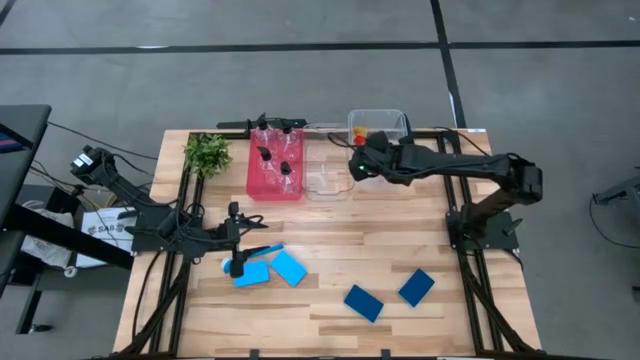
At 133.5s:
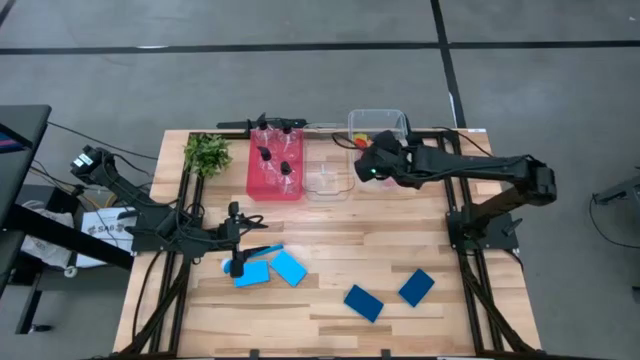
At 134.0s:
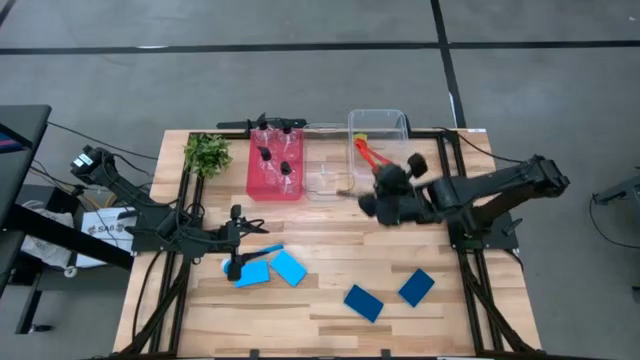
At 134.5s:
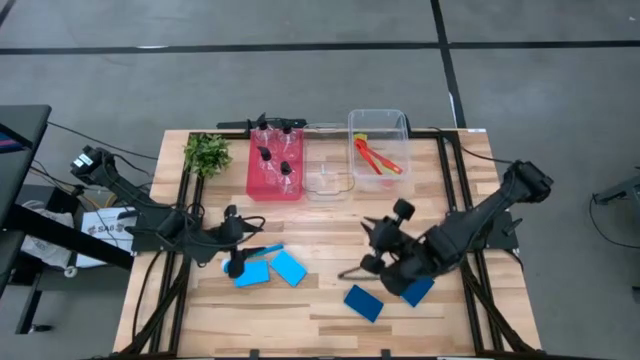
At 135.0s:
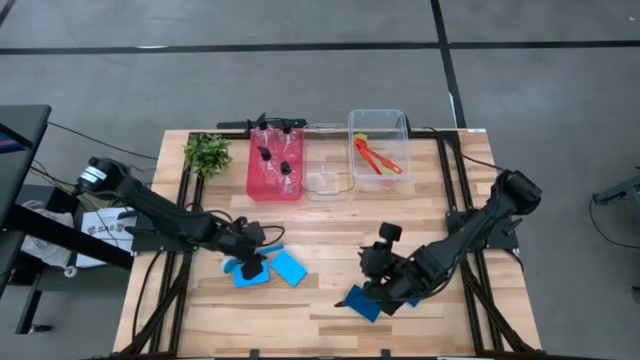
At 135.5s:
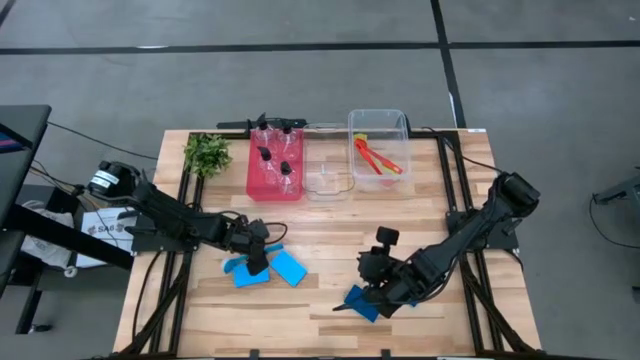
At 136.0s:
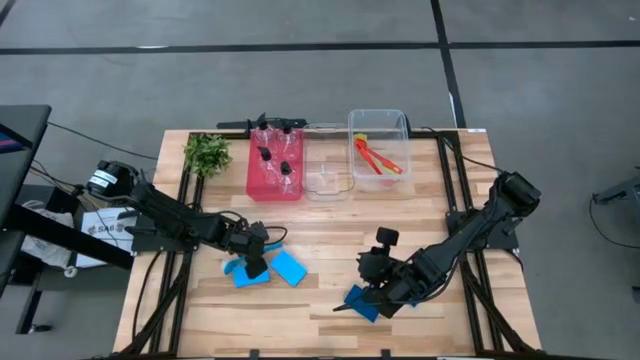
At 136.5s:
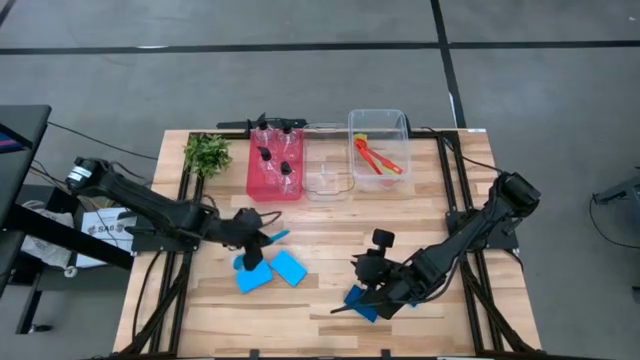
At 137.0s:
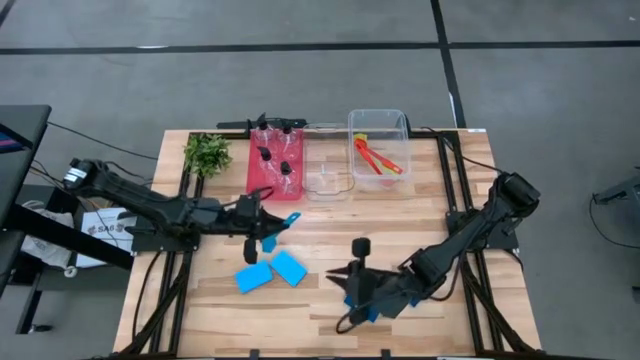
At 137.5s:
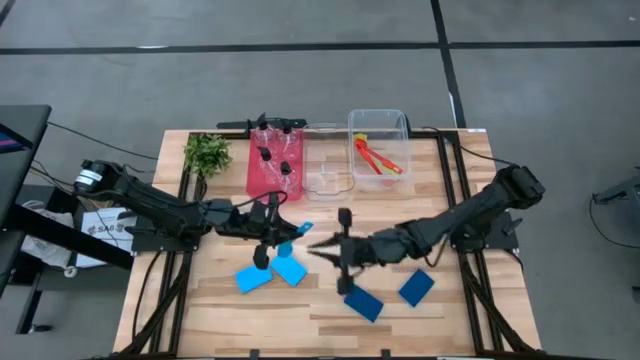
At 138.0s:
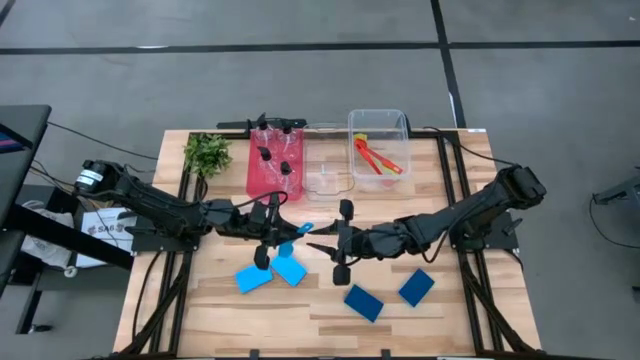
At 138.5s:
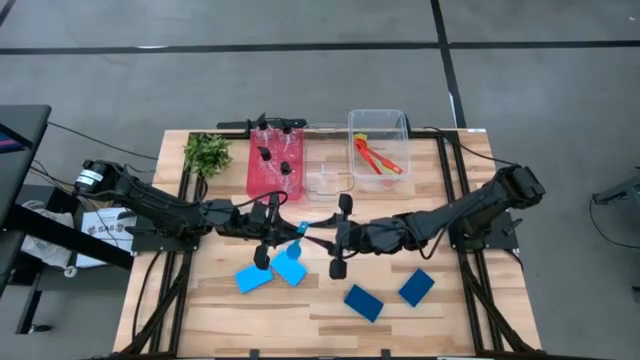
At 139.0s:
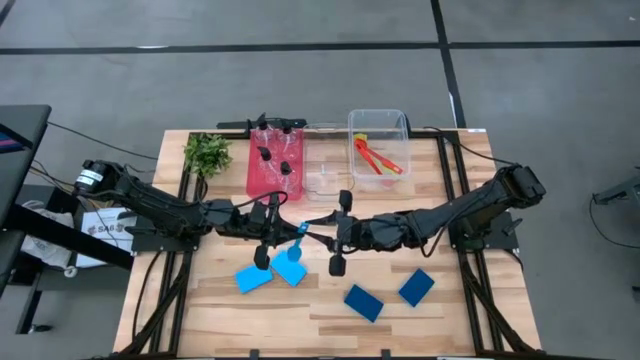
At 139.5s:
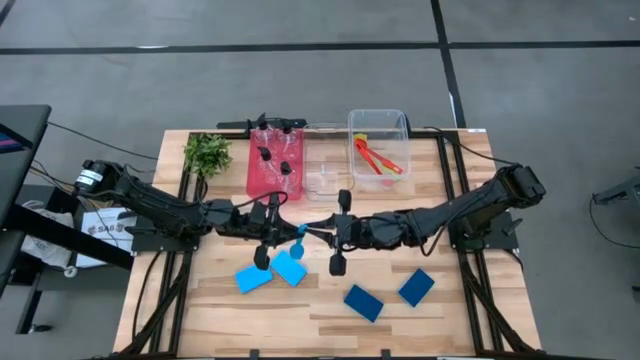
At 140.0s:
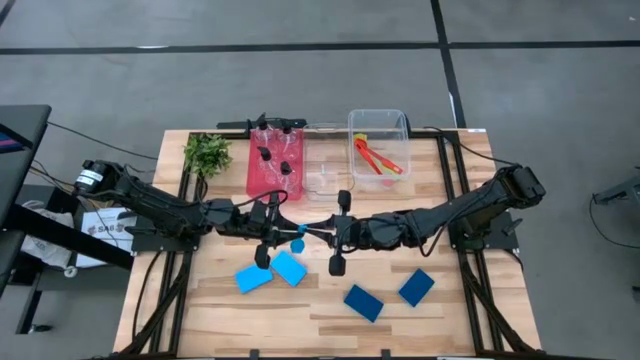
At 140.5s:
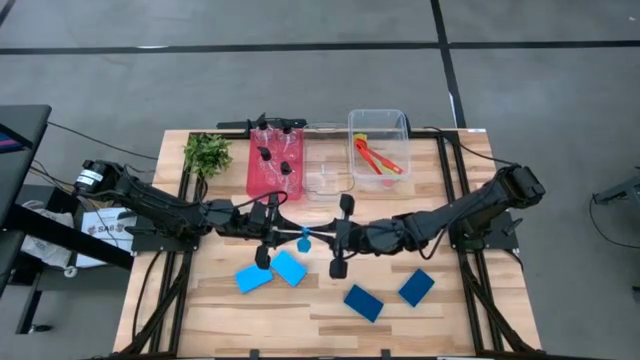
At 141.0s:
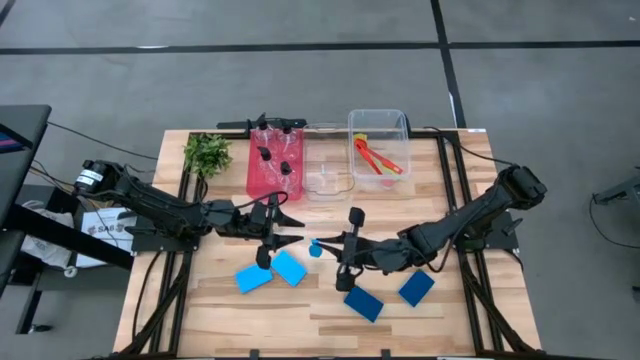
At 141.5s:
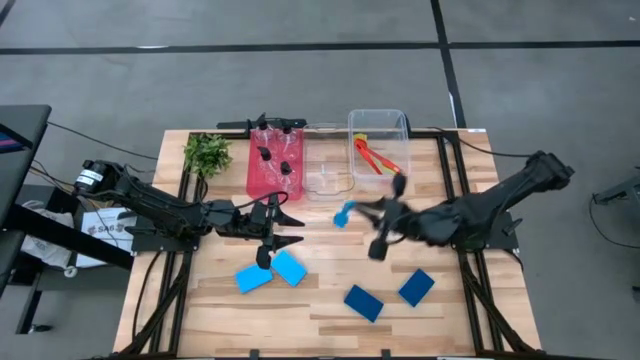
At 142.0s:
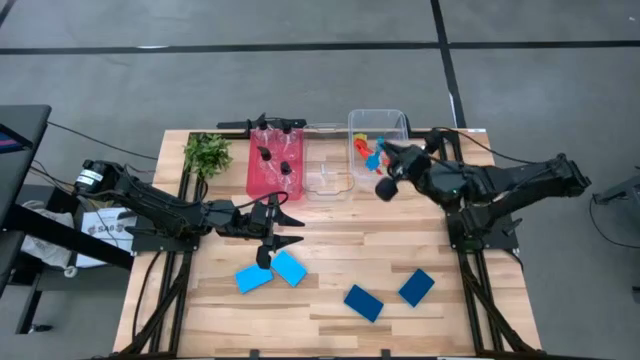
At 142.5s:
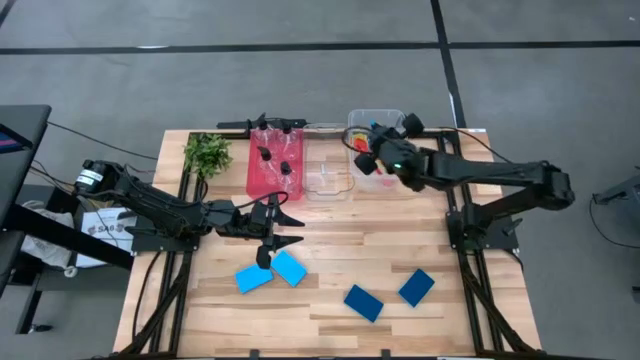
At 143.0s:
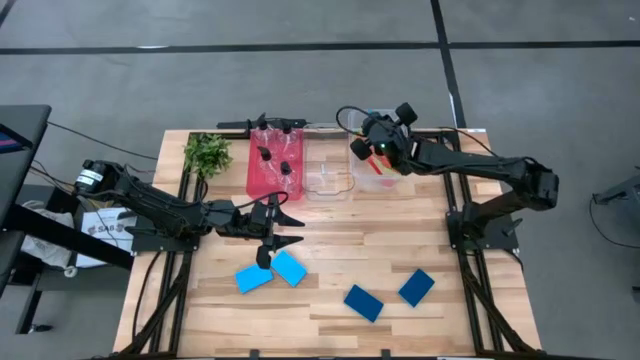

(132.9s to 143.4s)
Task: Pick & Place Kitchen Sink Supplies
Put the blue dish brush into the right transparent bin

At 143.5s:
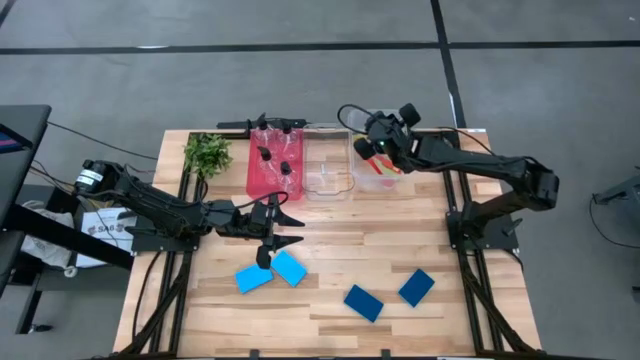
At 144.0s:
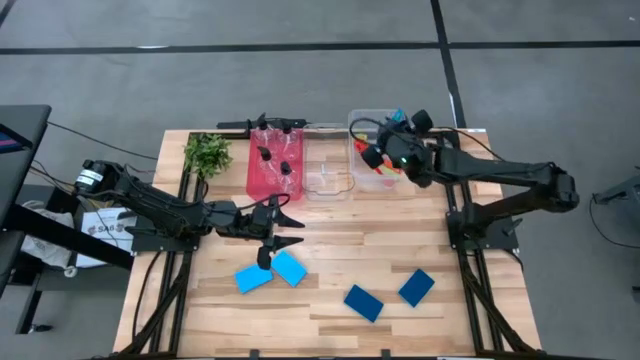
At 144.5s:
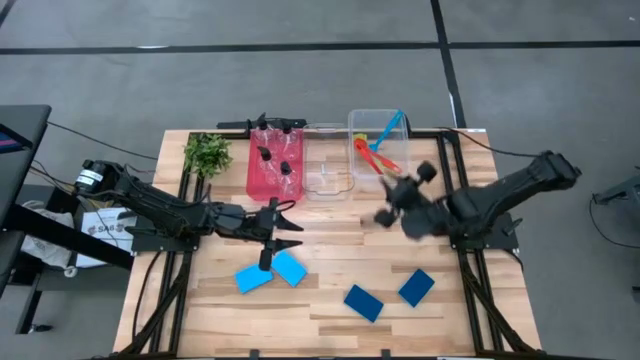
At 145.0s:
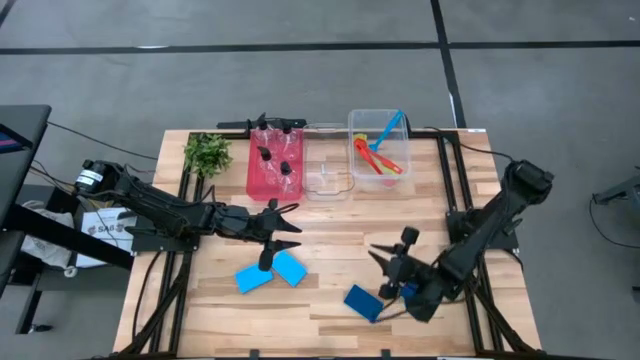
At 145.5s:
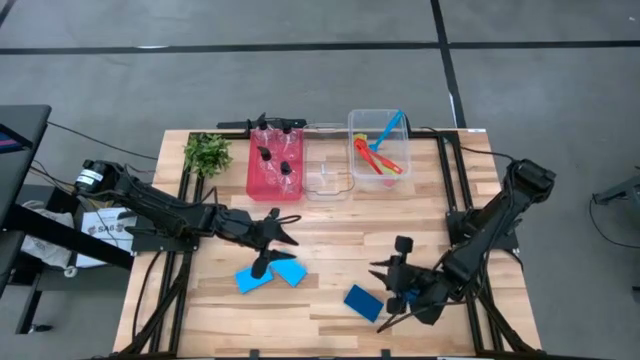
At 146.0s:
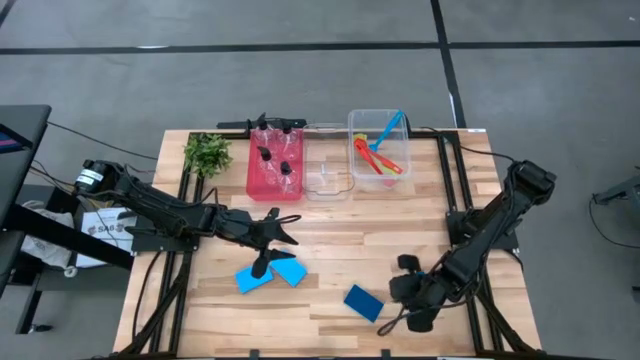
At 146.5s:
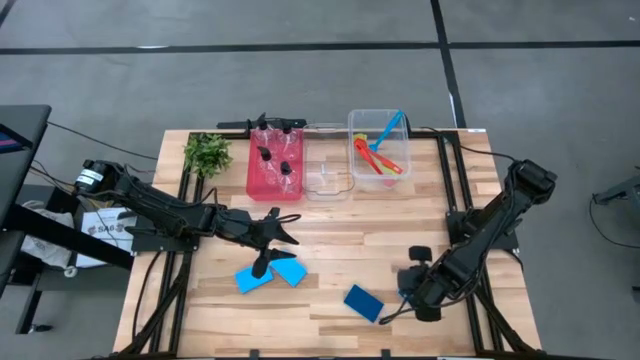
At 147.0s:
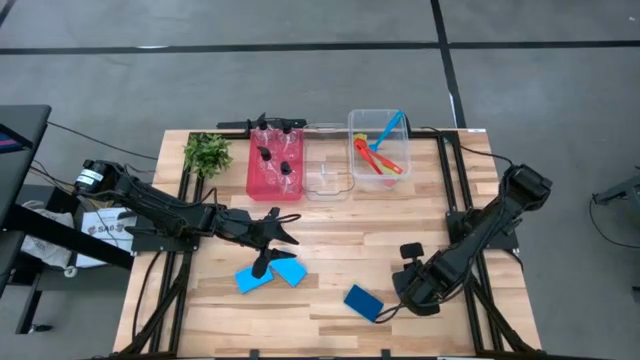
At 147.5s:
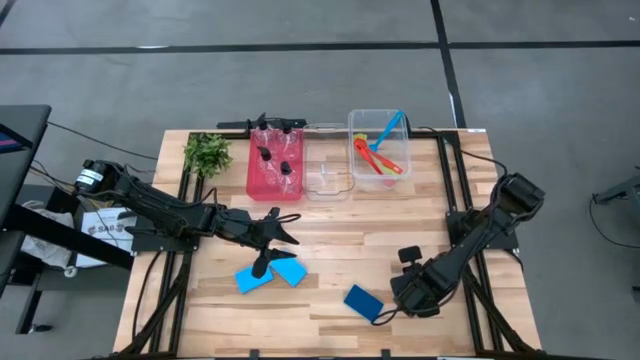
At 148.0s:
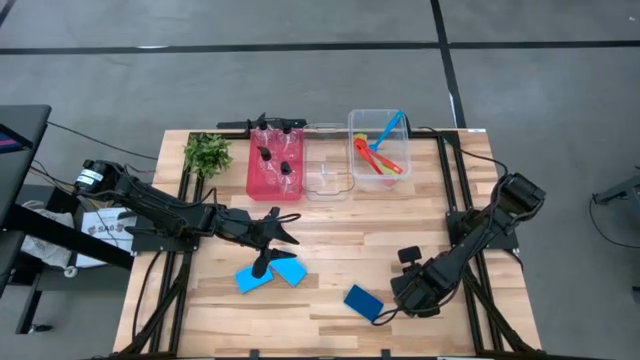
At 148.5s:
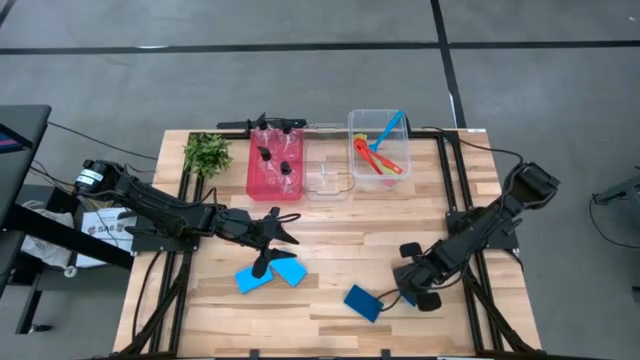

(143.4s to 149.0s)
Put the blue sponge into the left transparent bin

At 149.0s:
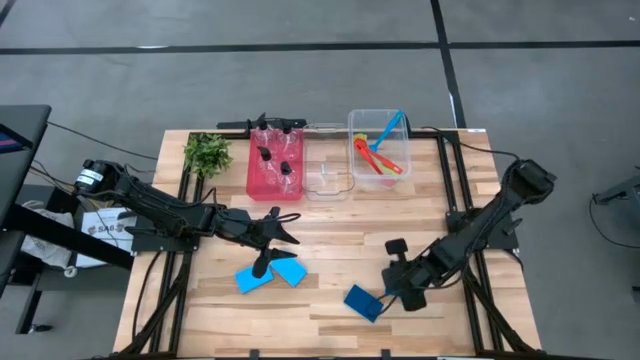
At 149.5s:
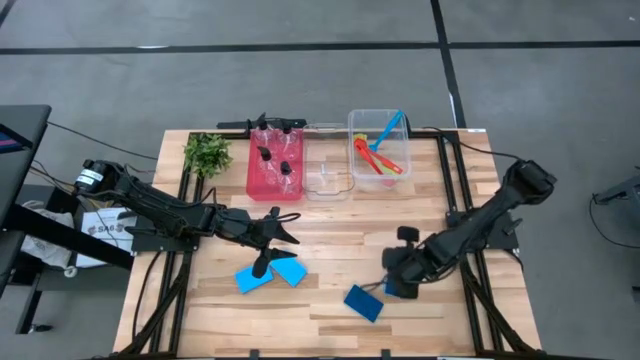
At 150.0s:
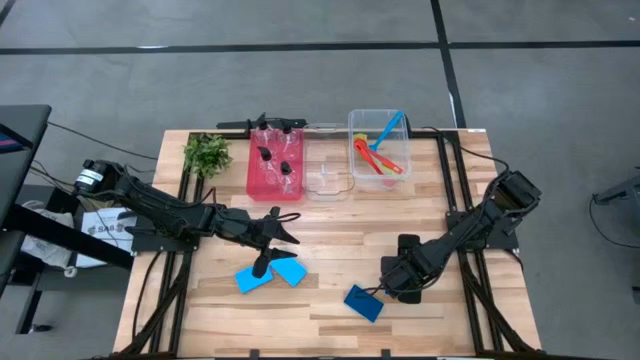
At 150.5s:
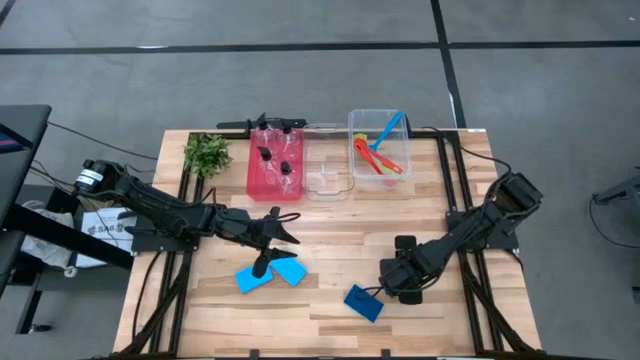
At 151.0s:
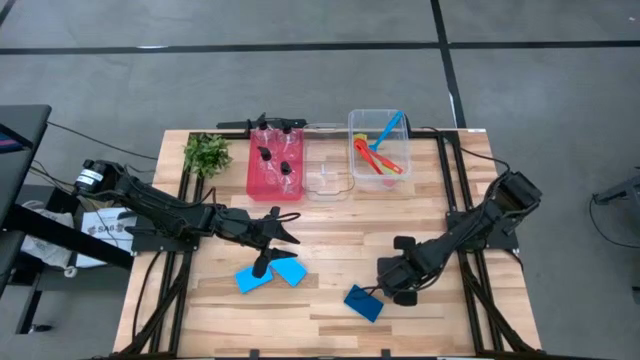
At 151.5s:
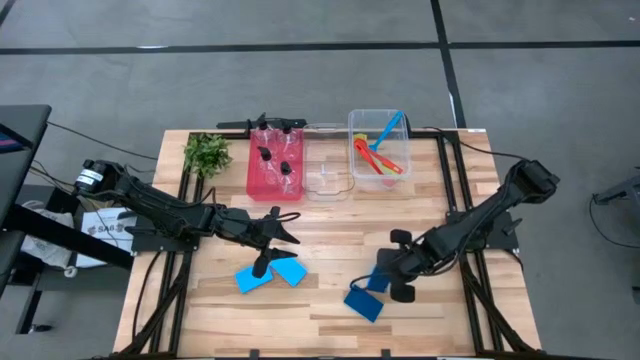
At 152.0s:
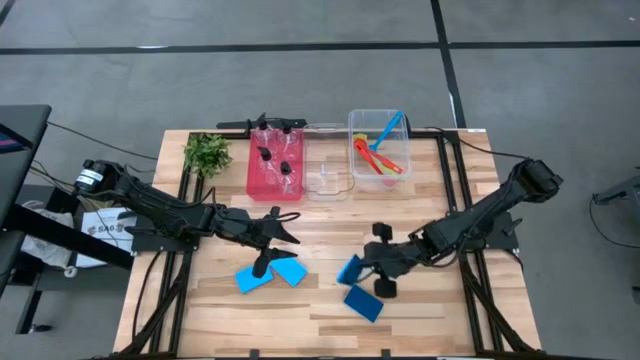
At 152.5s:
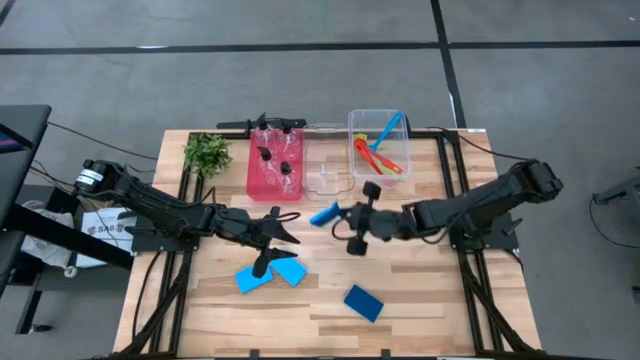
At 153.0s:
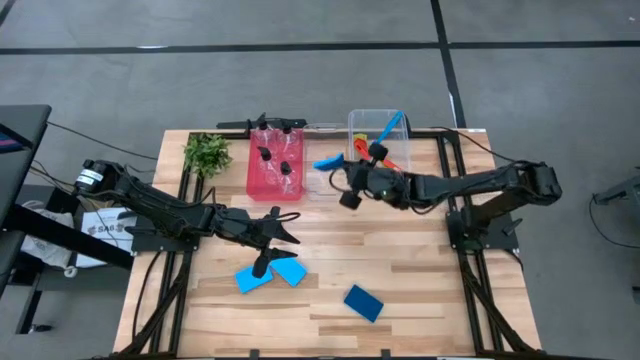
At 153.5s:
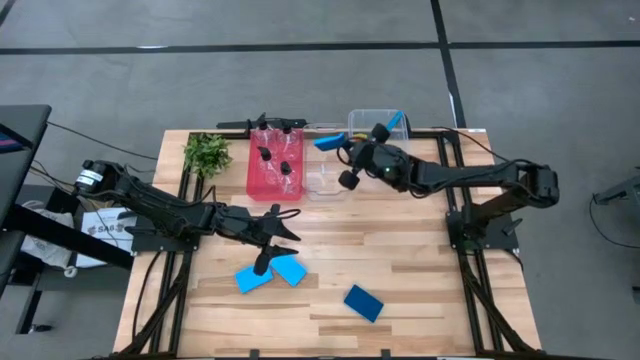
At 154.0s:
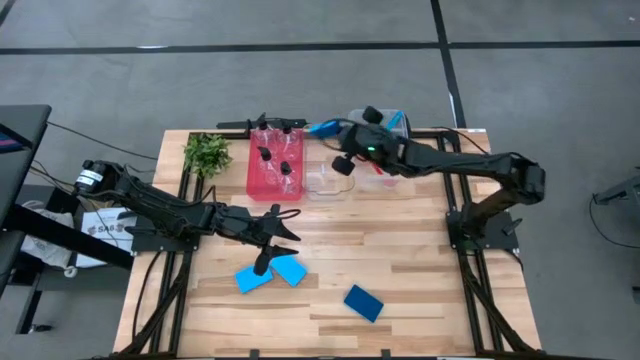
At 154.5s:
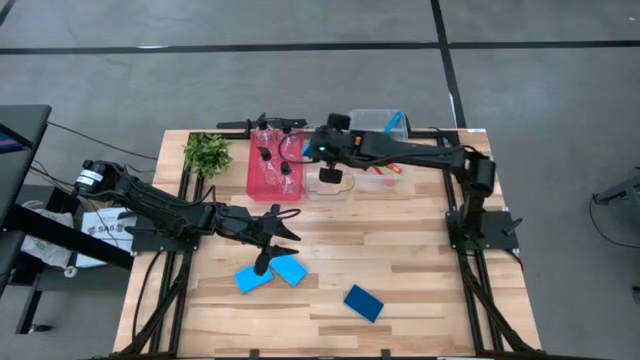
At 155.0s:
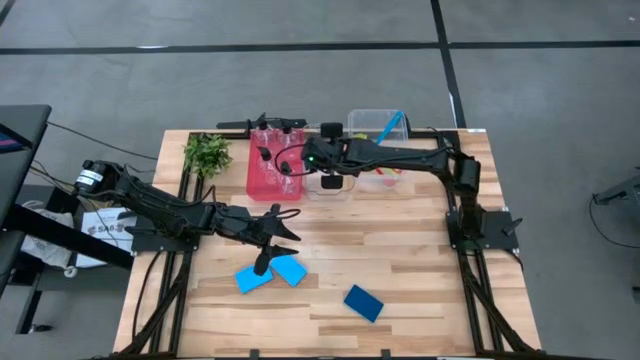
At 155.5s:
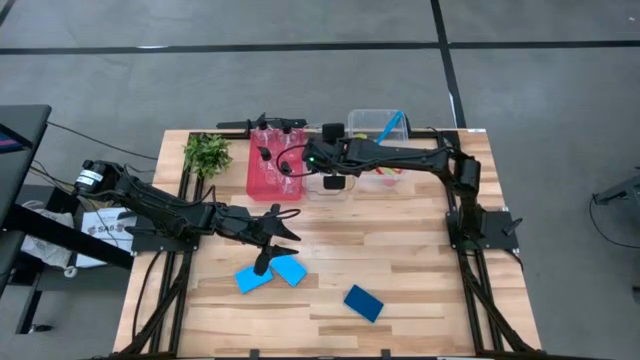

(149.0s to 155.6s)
Put the blue sponge into the left transparent bin
